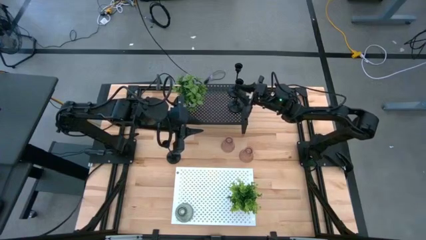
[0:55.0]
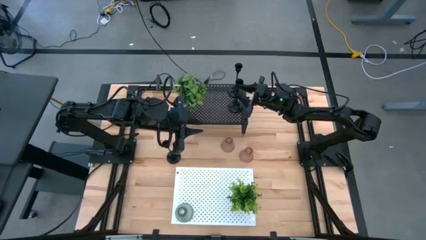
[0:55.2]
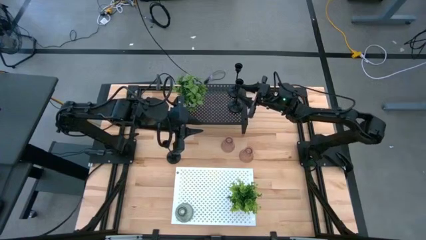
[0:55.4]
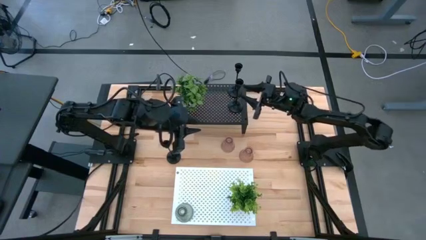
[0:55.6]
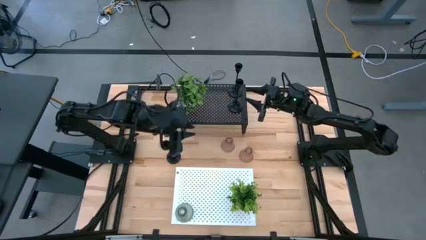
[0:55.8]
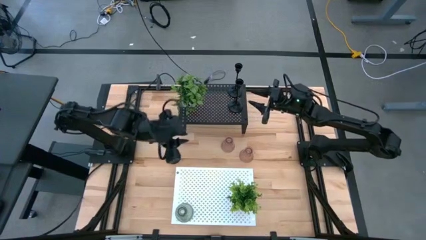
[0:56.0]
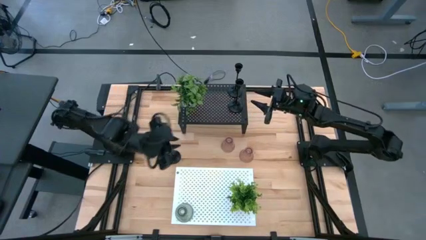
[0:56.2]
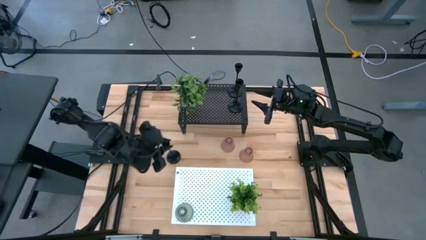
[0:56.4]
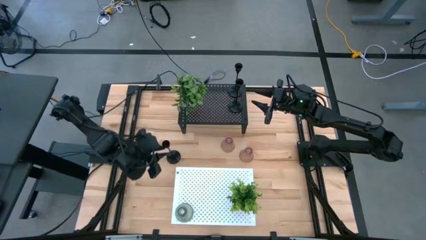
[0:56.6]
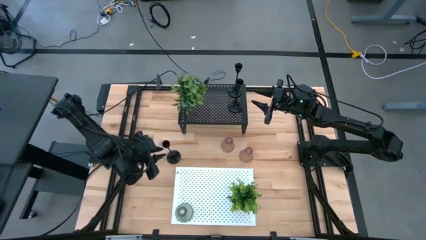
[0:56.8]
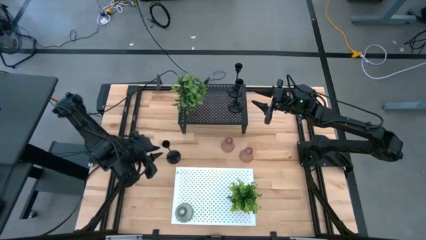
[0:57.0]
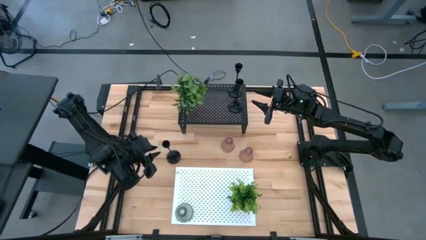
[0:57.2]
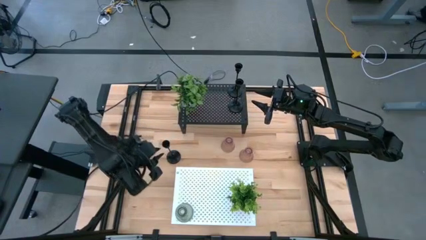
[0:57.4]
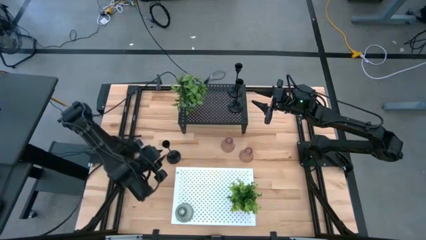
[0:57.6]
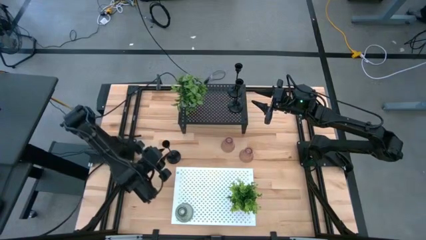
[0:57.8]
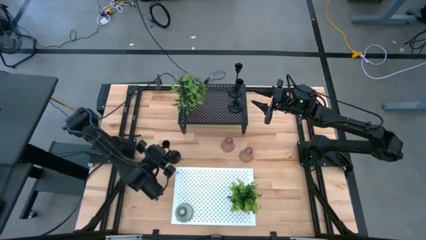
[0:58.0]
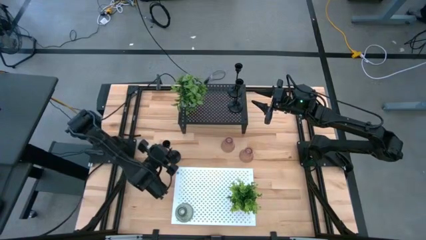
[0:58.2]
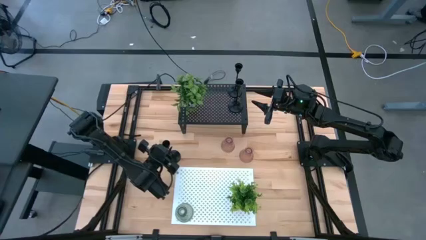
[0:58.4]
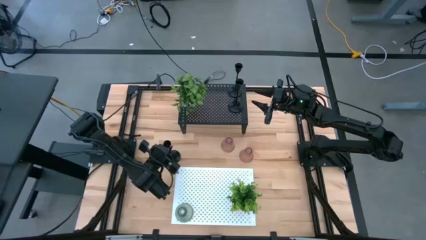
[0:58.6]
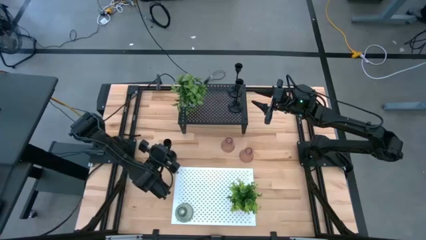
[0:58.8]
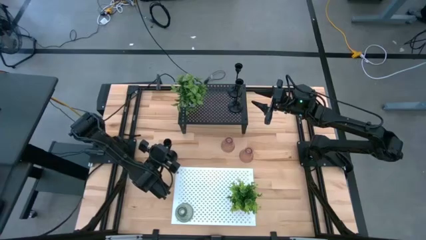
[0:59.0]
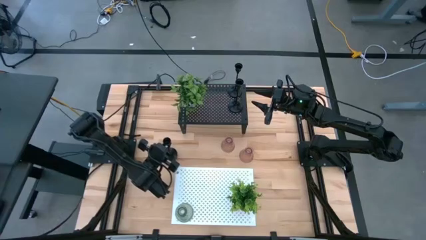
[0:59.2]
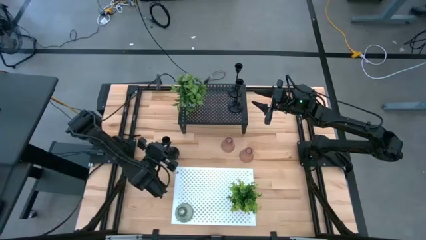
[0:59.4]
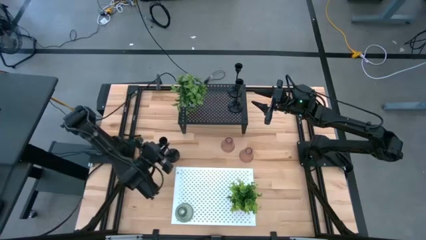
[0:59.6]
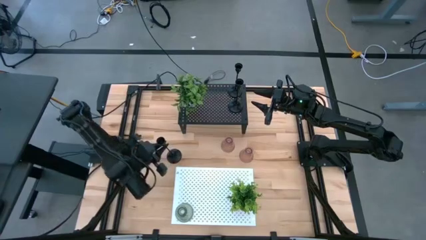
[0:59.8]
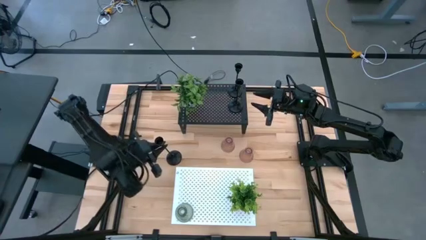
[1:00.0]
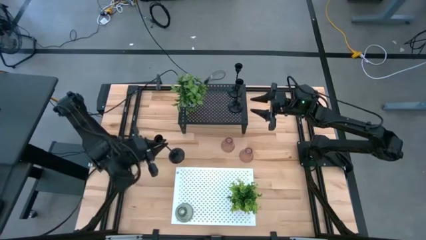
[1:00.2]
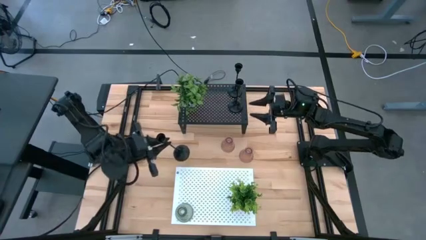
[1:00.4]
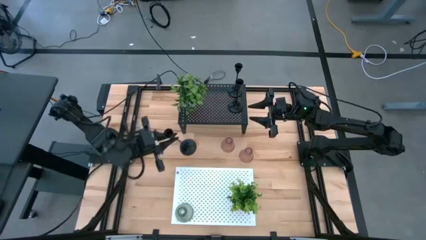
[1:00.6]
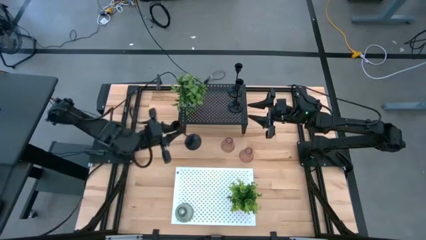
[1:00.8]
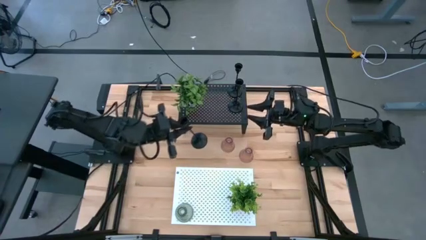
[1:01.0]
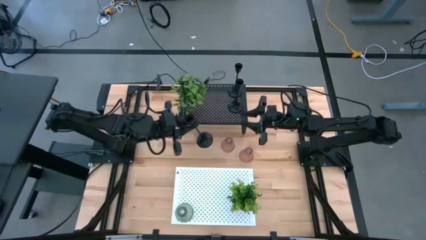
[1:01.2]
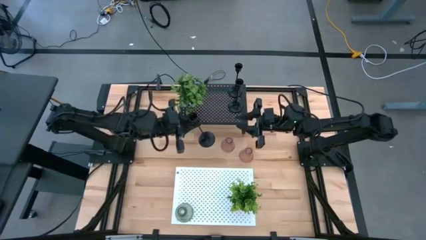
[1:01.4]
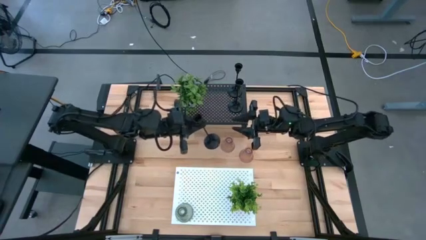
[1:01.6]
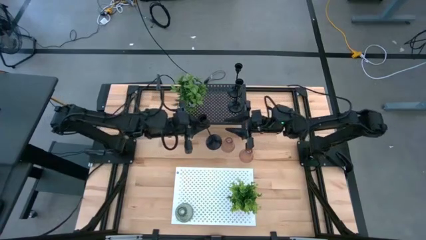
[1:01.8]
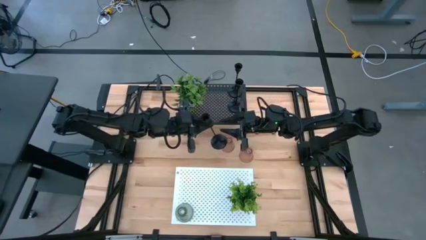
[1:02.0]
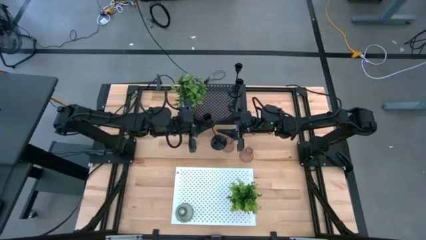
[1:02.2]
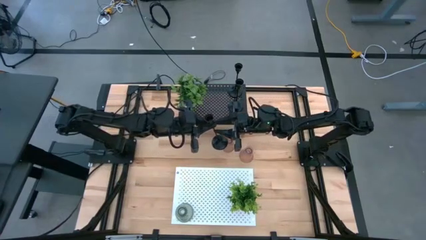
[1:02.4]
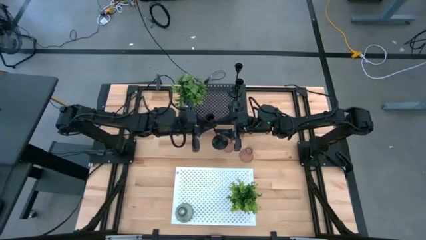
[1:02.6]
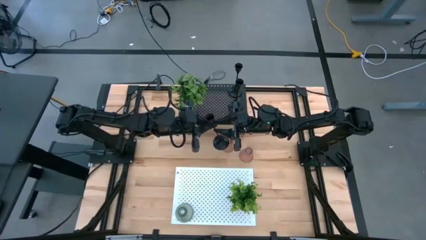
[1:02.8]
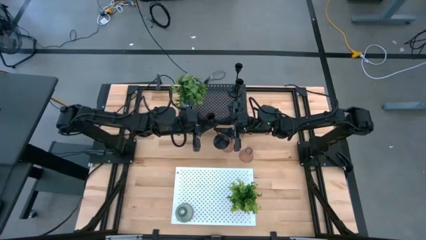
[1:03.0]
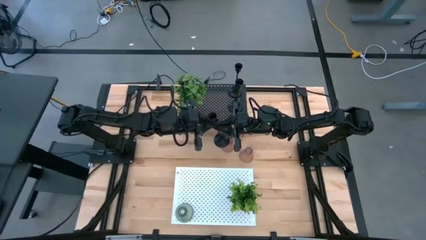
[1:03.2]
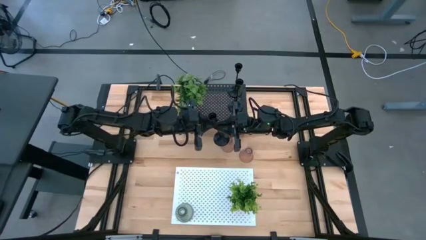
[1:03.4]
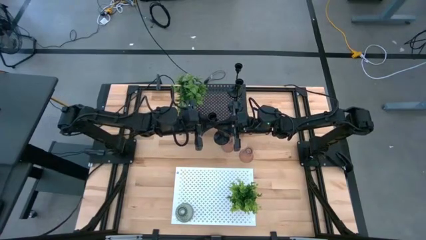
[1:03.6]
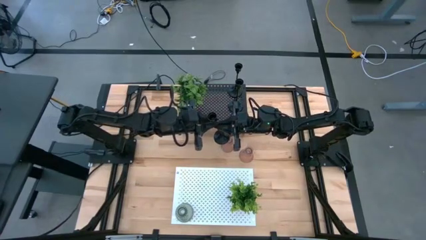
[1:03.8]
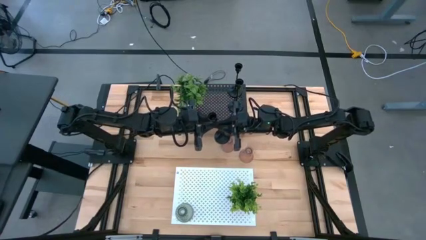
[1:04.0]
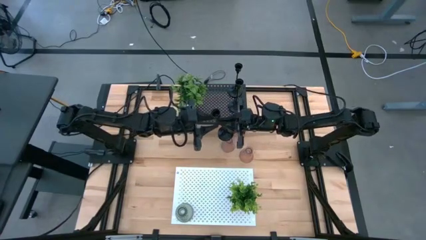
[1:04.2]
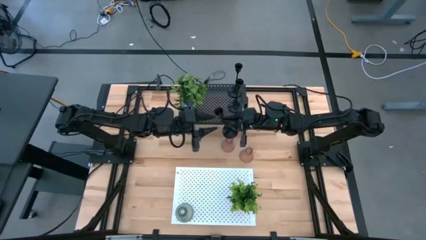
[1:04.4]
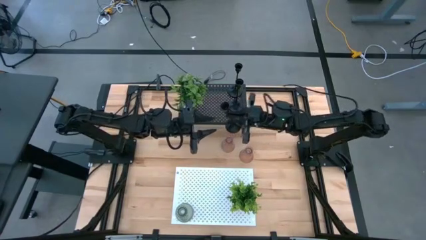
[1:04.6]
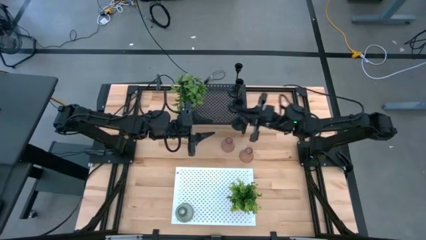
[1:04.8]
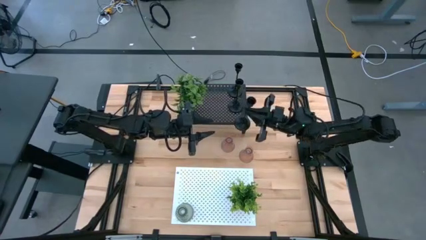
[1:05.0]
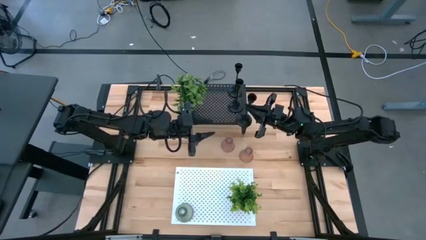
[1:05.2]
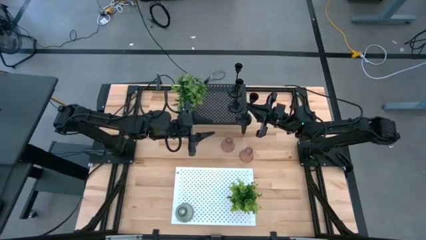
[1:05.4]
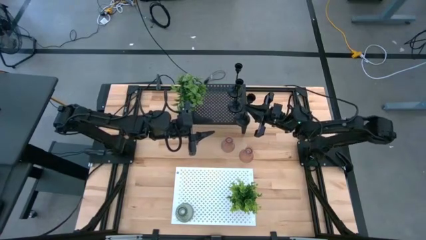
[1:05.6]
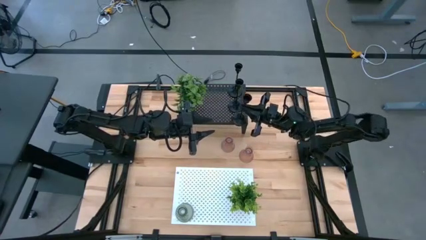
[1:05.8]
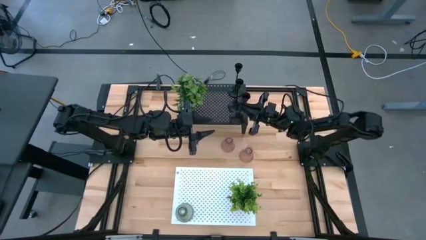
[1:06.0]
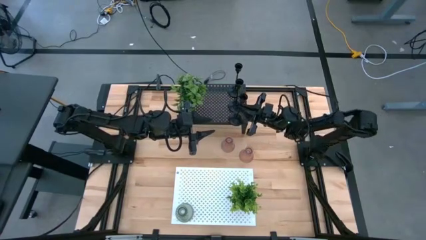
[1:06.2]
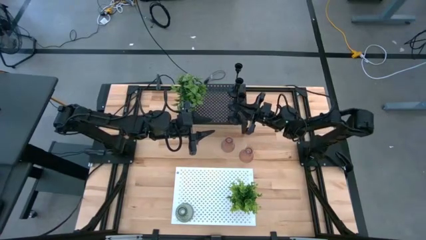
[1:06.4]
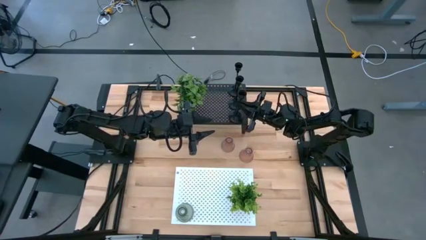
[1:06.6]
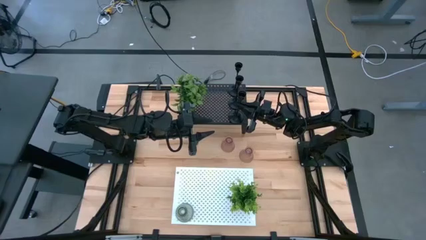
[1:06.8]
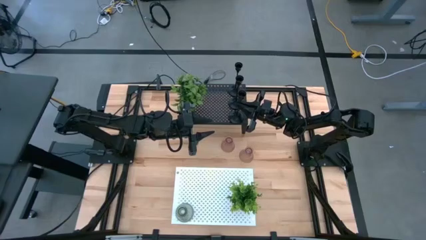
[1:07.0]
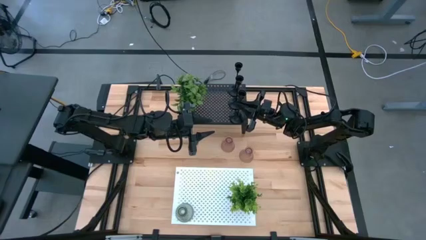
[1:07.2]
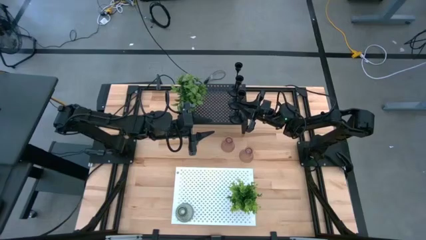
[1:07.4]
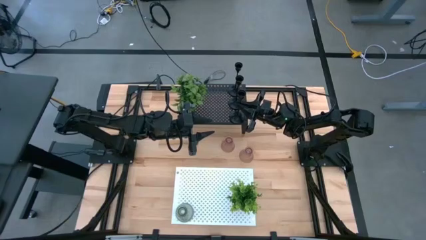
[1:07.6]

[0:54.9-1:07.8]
Task: Pick & Place candle stick holders
Put the big black candle holder on the black shelf aligned with the other big black candle holder
